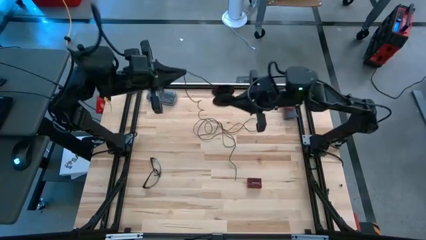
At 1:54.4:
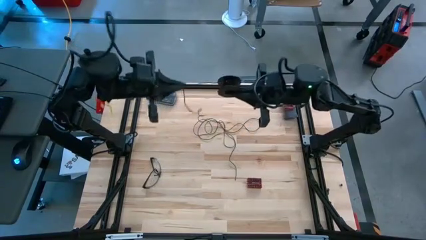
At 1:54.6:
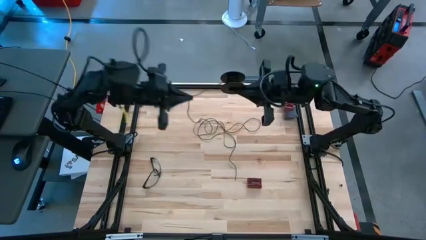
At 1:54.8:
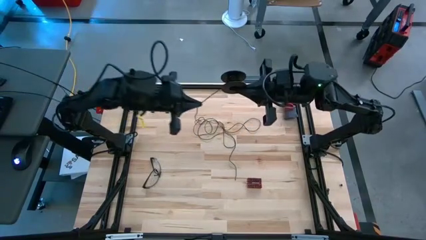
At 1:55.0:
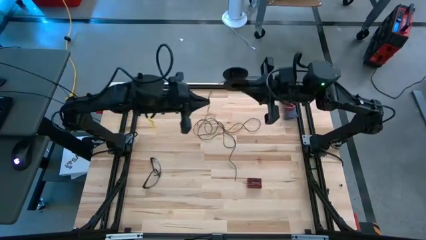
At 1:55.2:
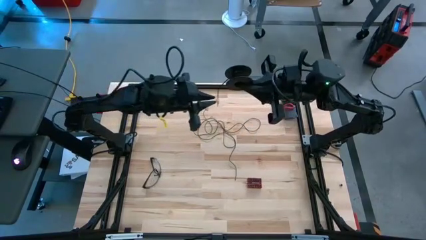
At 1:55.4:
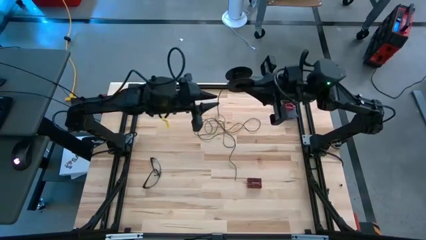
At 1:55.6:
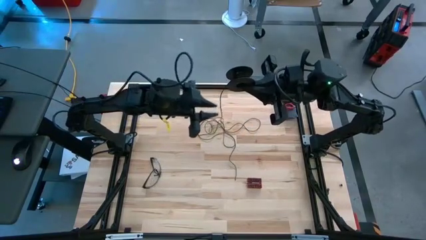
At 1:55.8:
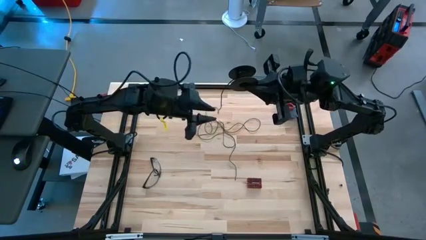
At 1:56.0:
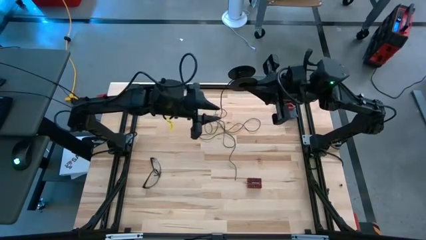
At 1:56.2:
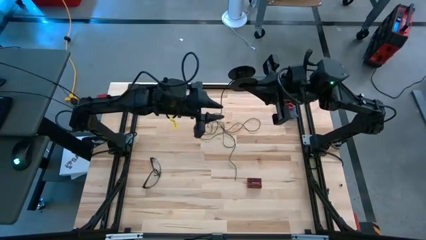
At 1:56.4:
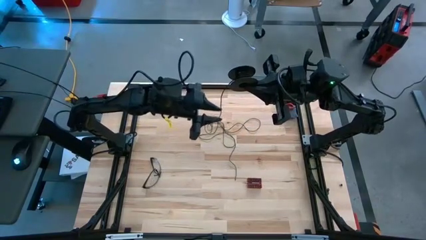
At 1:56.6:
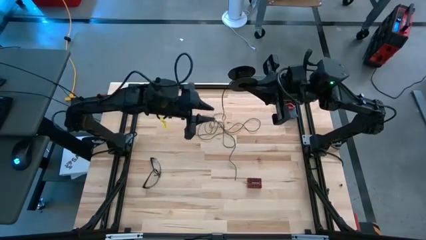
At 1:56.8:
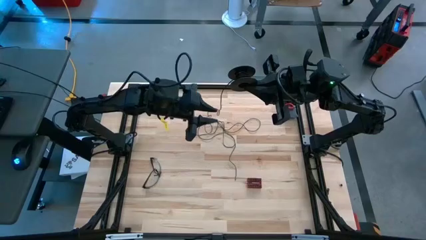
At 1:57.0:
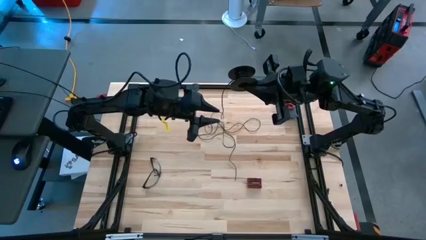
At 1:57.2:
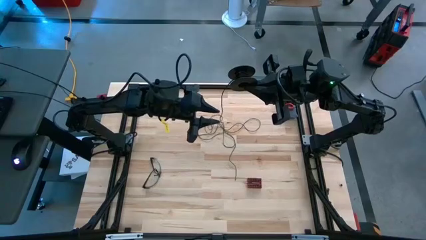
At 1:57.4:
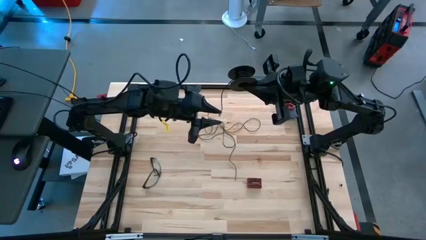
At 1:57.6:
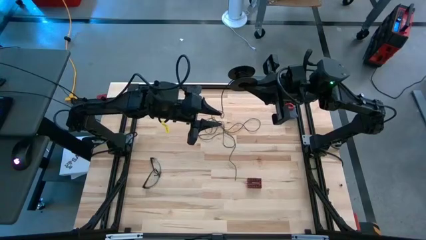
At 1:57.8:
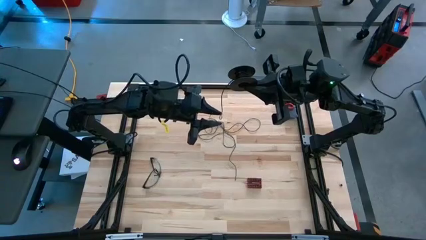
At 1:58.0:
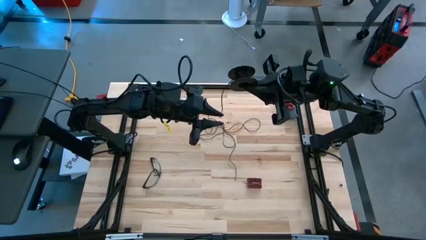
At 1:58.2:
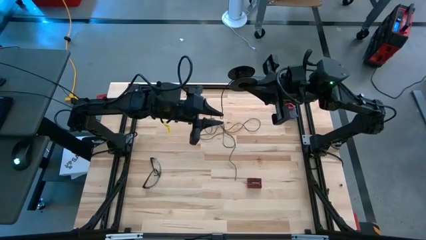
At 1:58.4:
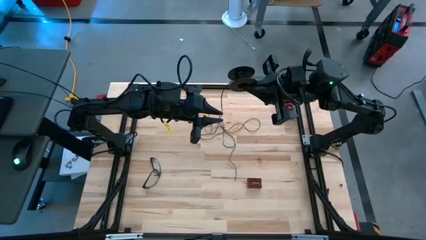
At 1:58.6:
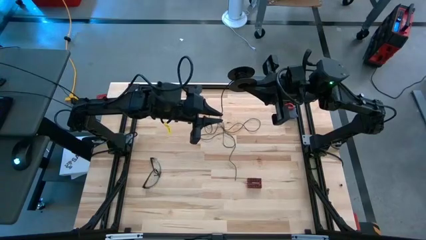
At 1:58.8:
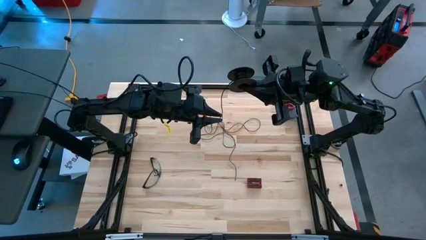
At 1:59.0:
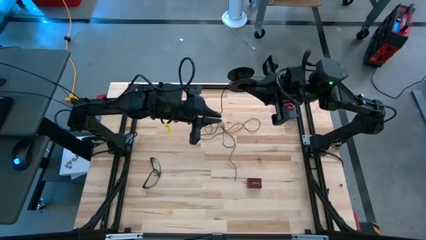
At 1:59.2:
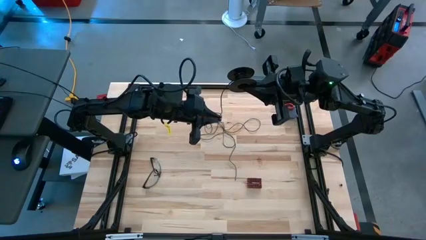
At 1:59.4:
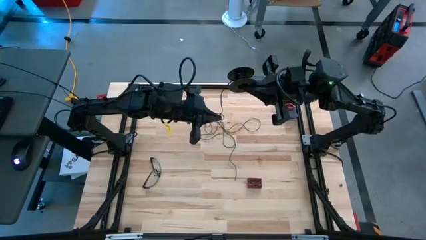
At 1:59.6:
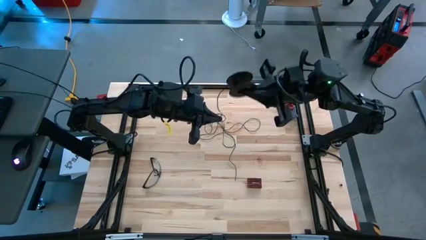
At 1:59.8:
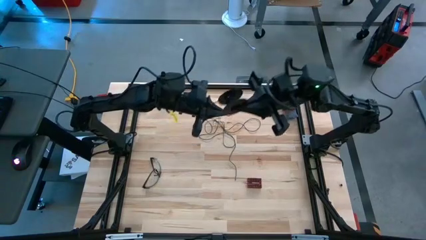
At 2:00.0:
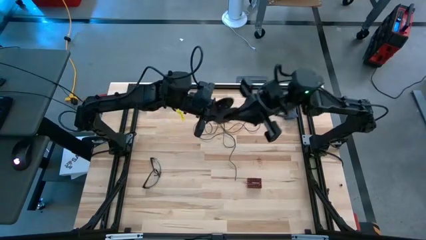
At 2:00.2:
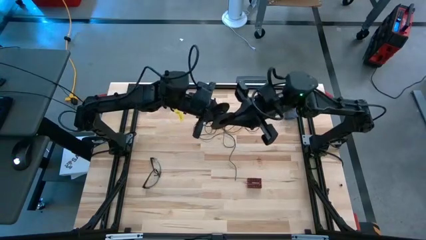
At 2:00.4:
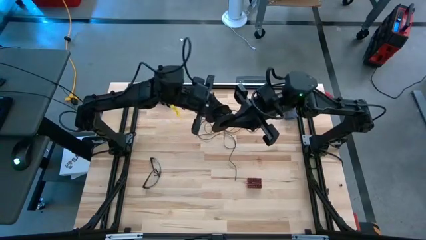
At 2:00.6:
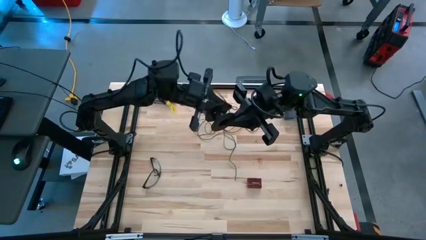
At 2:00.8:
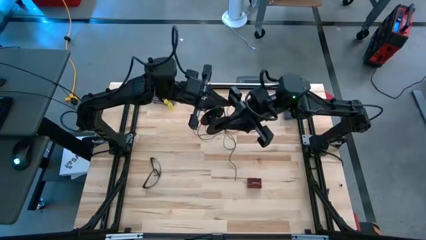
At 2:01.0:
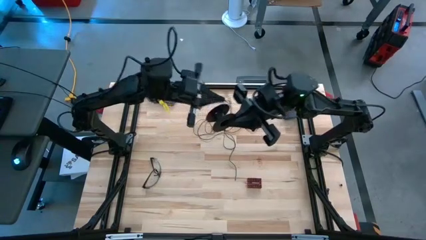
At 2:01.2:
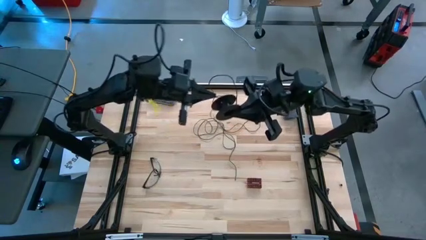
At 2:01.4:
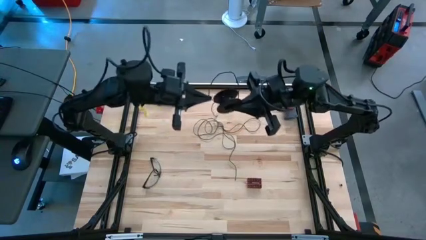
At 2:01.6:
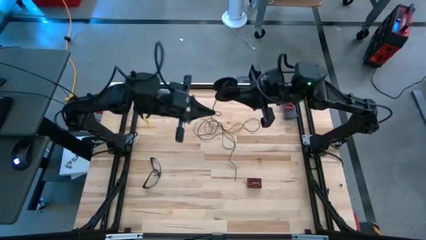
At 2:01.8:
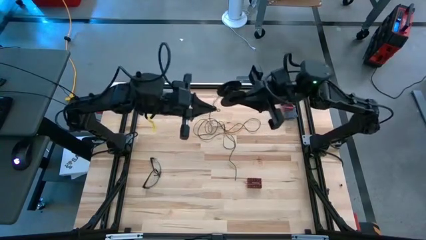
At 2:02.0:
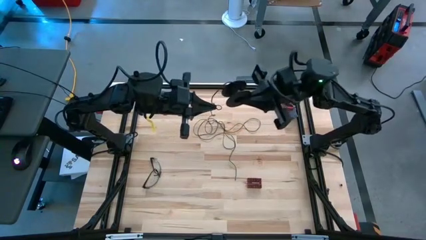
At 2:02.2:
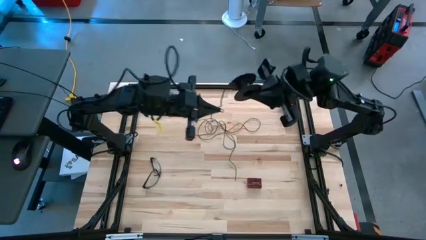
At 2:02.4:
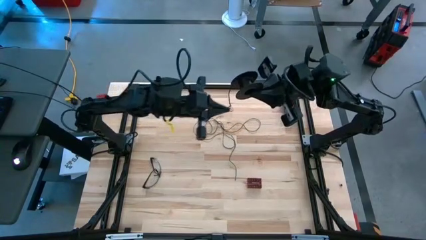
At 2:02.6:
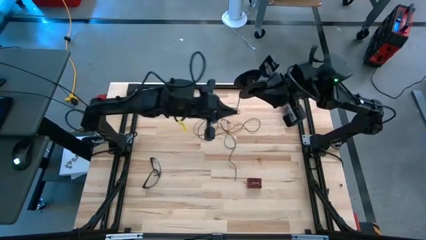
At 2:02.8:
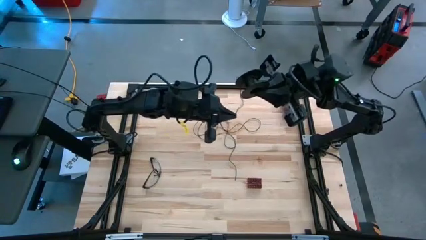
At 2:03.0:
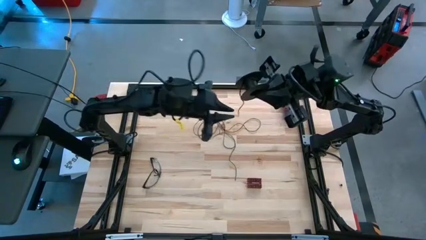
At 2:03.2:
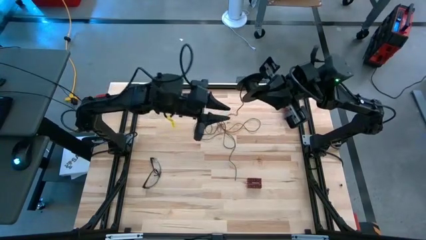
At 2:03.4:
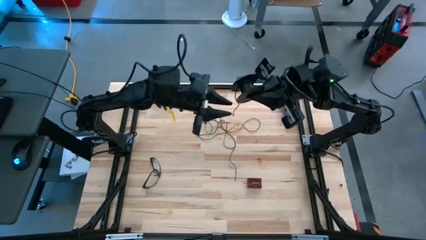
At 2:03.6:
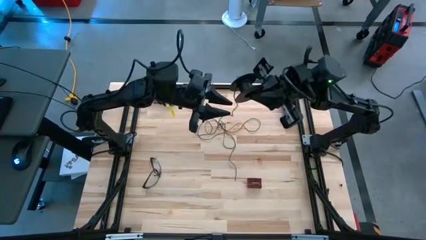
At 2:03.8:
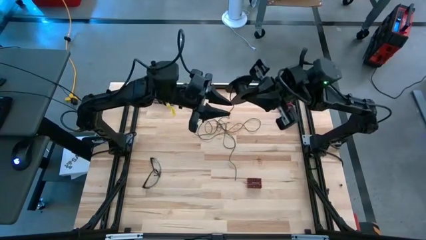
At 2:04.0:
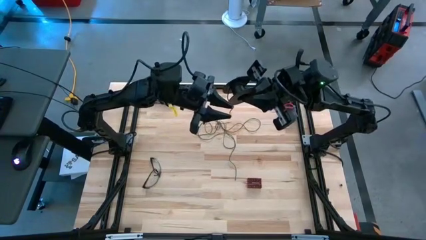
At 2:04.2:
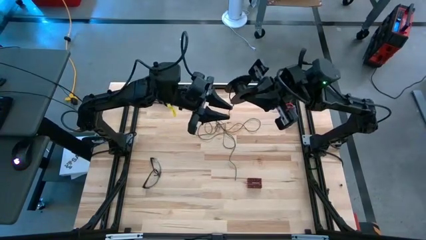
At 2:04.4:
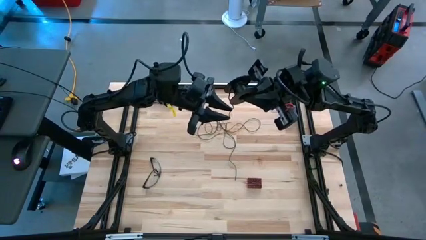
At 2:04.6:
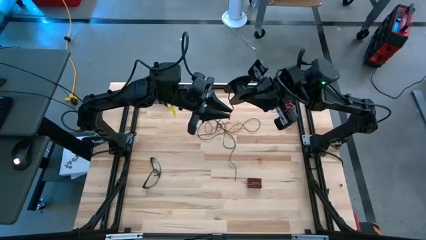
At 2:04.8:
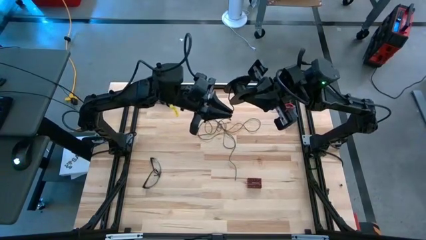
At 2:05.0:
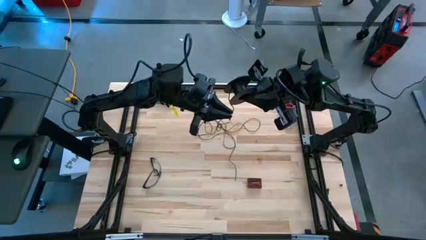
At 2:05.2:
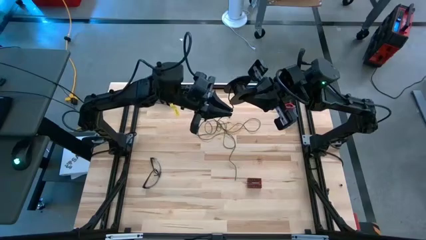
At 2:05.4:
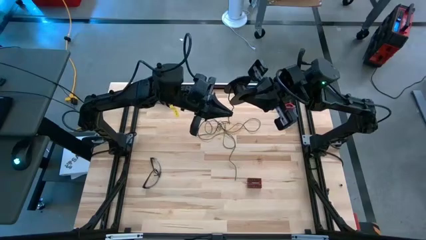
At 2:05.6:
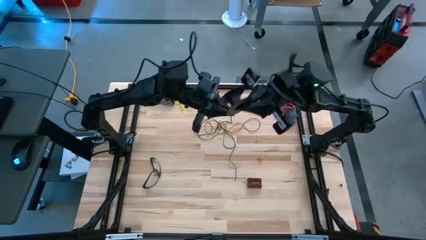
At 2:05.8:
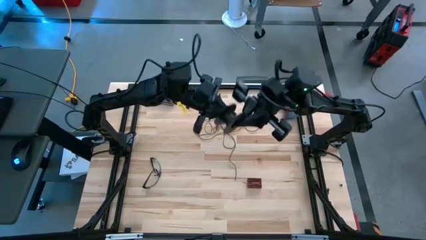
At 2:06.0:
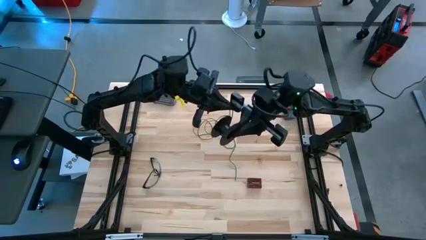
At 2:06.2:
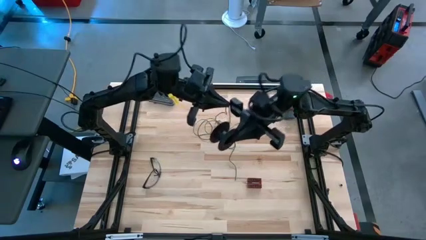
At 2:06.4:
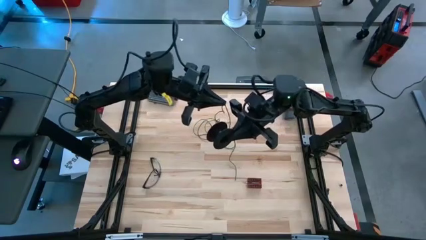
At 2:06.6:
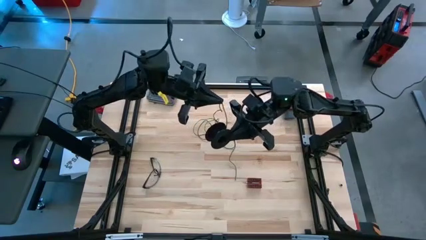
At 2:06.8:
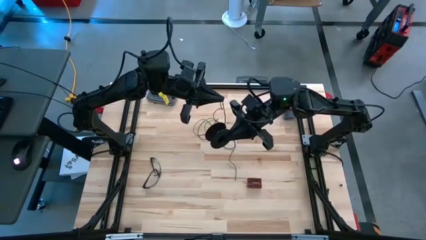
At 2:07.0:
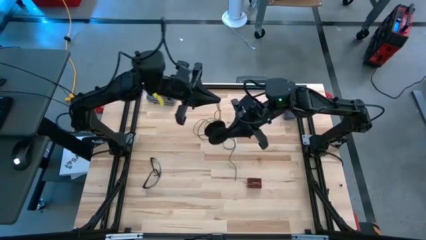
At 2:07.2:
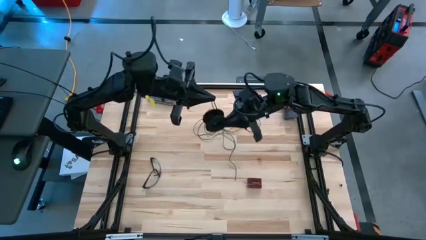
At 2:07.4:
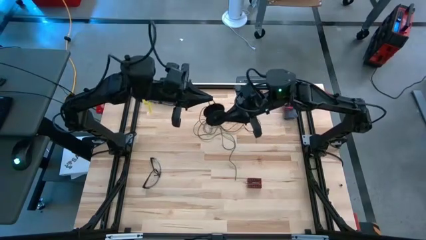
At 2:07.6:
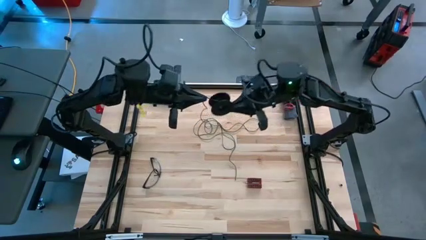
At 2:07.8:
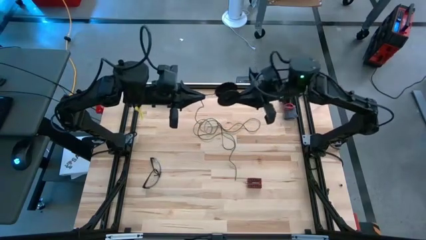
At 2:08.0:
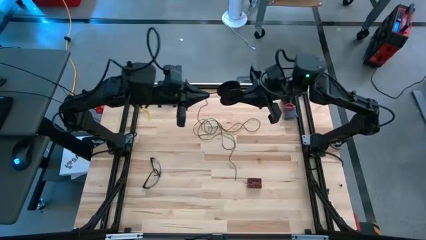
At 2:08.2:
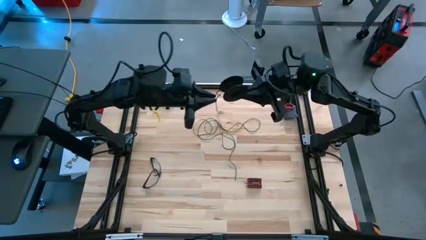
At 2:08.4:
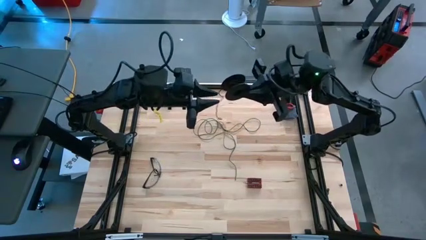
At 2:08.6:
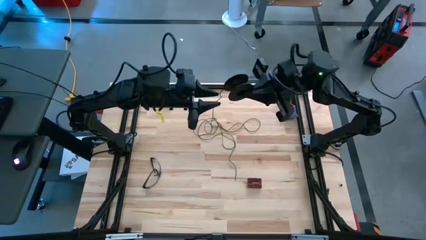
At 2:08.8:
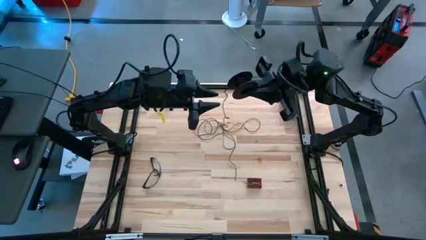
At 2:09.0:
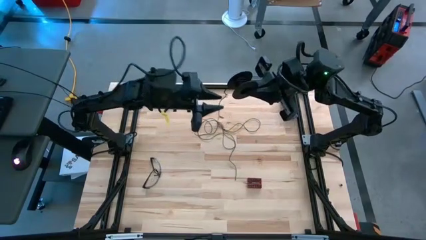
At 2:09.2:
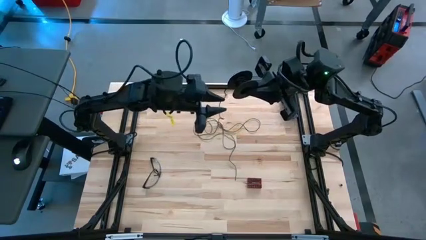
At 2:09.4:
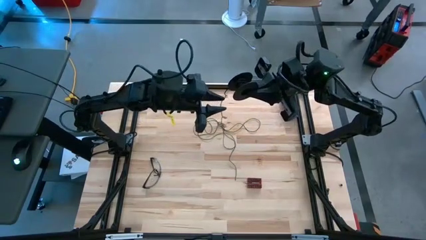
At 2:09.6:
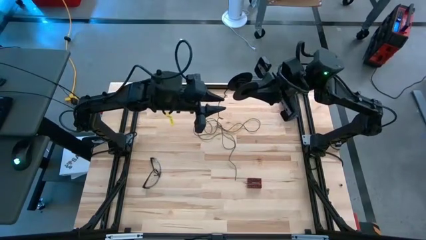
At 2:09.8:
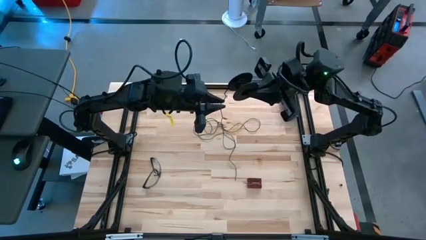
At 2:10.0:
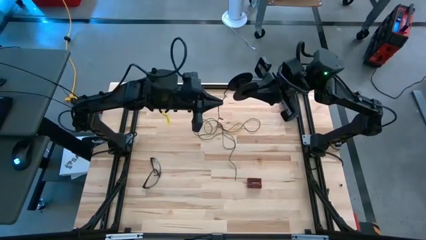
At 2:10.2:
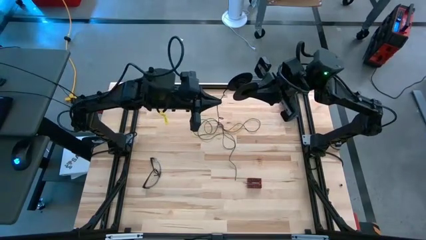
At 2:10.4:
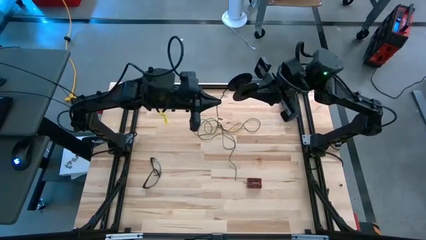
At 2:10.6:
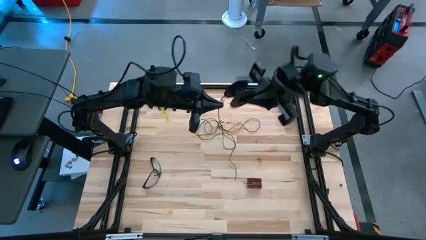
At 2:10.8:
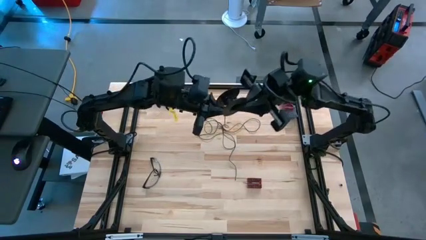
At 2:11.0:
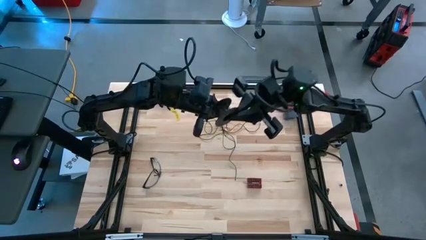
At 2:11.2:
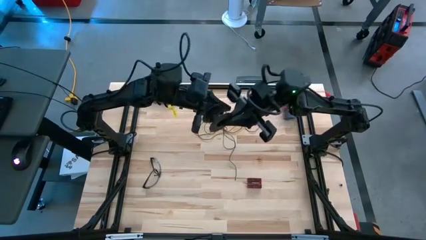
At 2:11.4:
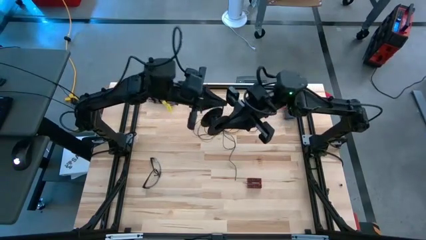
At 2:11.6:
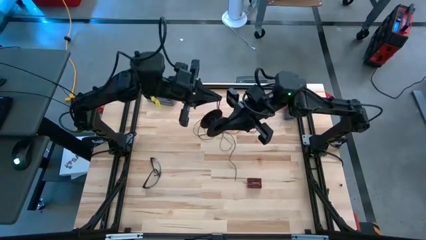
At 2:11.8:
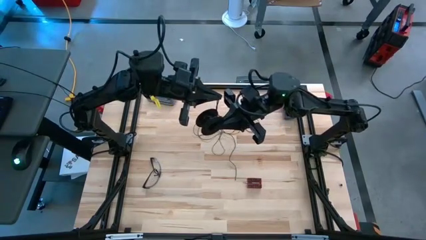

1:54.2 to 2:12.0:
Task: Coil cords
Coil the black wire into the spool
